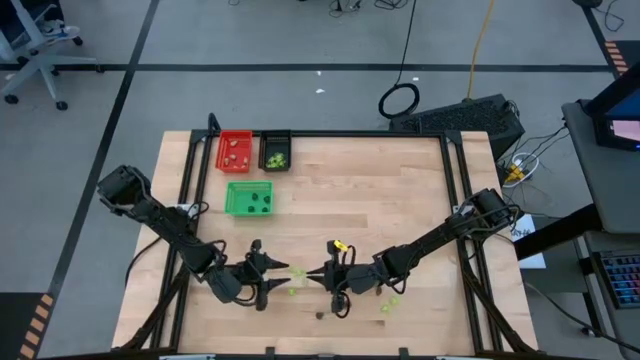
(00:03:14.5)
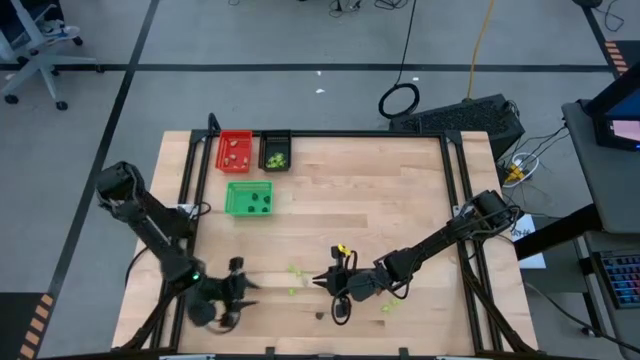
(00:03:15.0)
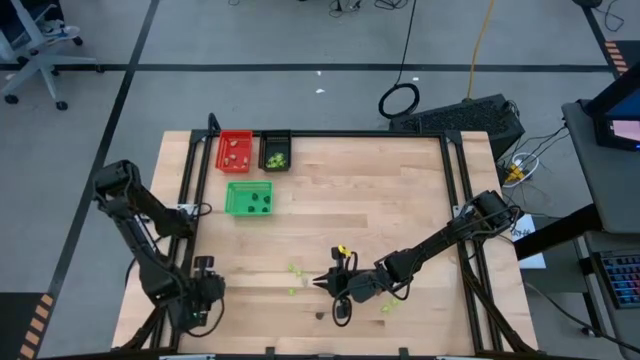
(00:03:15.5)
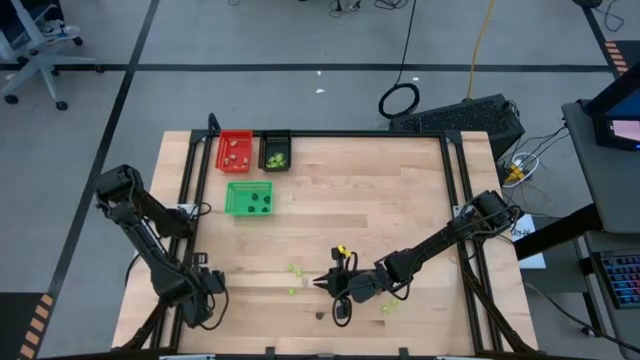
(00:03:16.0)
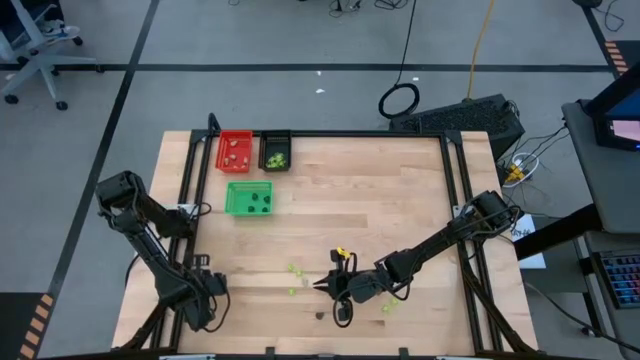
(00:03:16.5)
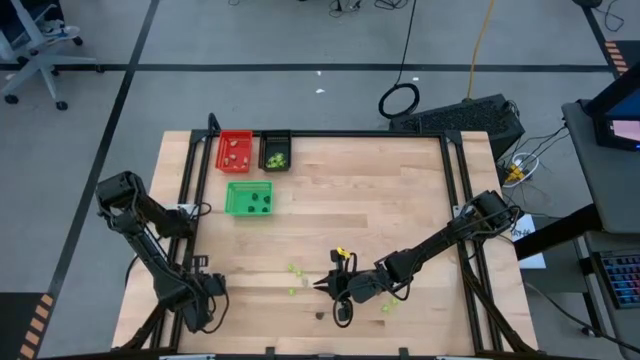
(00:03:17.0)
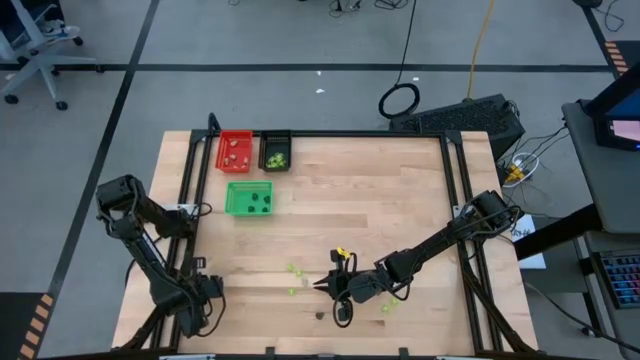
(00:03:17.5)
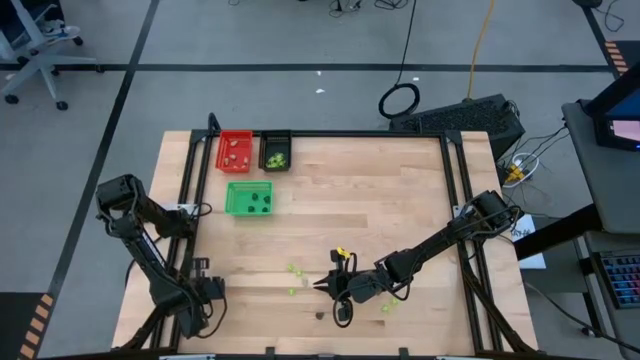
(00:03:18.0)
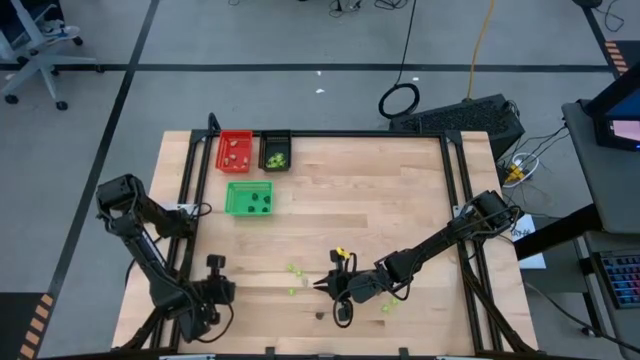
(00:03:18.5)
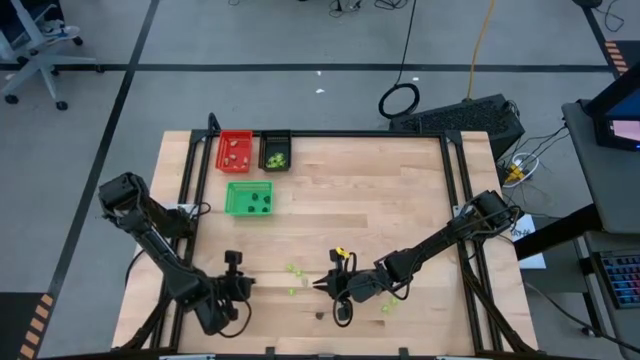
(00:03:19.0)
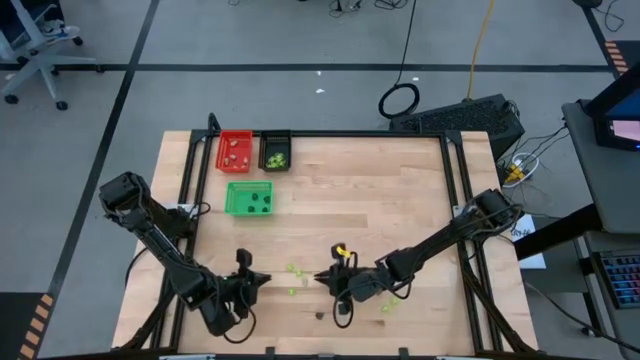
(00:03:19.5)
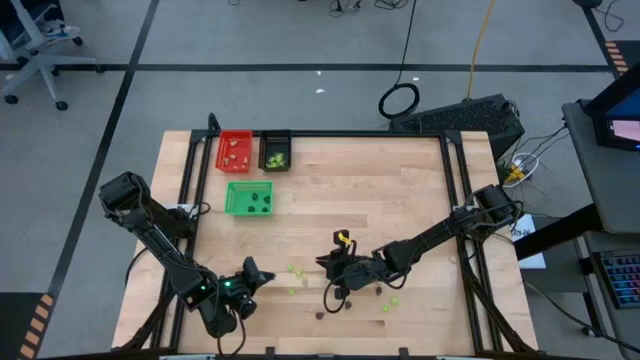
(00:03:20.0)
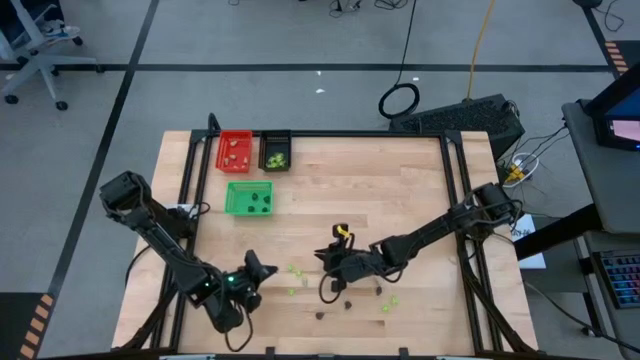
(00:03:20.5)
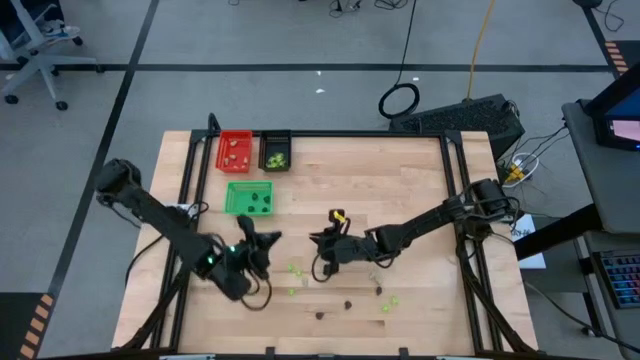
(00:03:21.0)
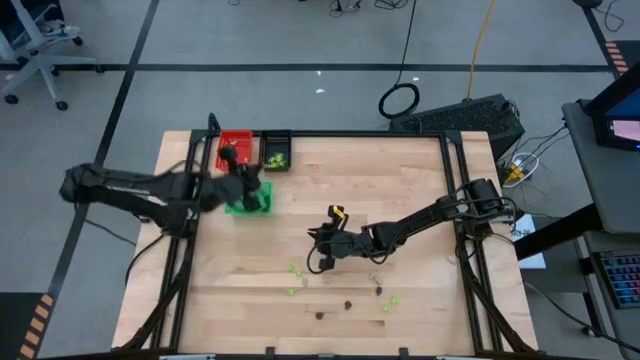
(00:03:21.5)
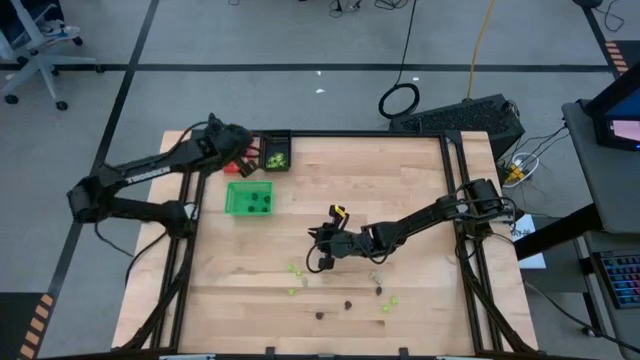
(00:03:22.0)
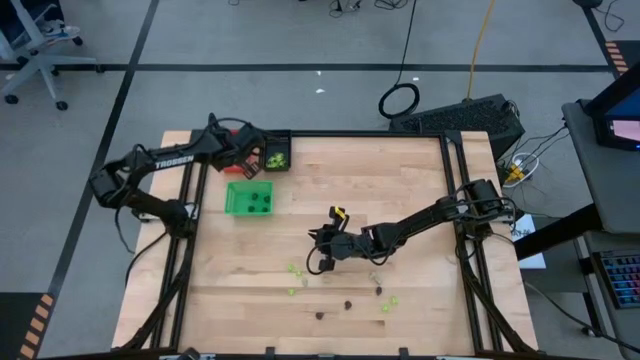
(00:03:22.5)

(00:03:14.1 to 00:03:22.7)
Task: Sort Halloween decoration
Put the white skull toy into the red bin

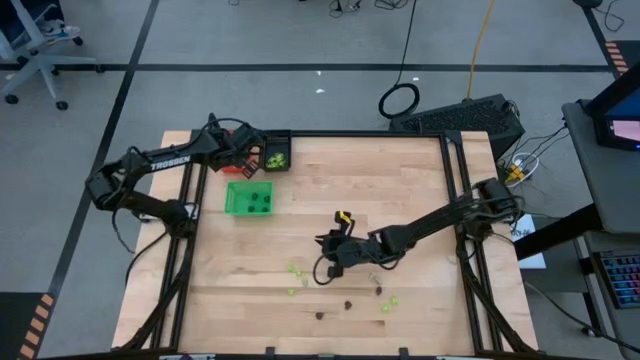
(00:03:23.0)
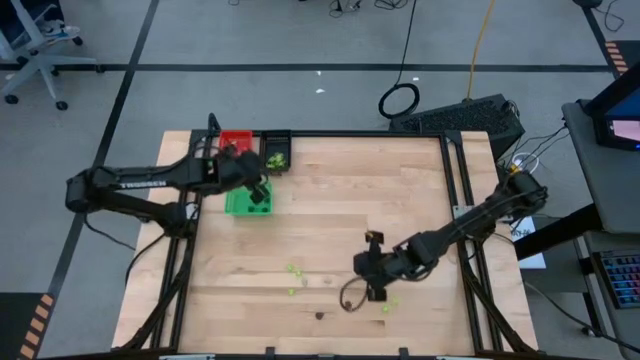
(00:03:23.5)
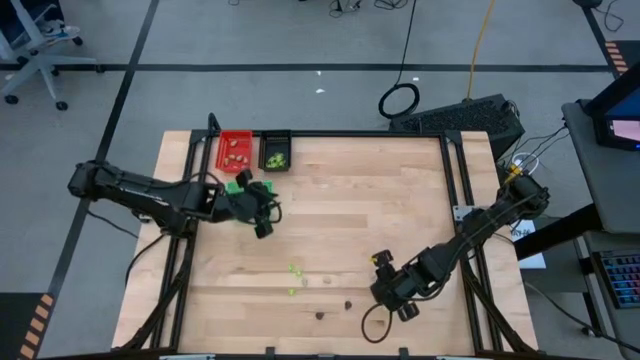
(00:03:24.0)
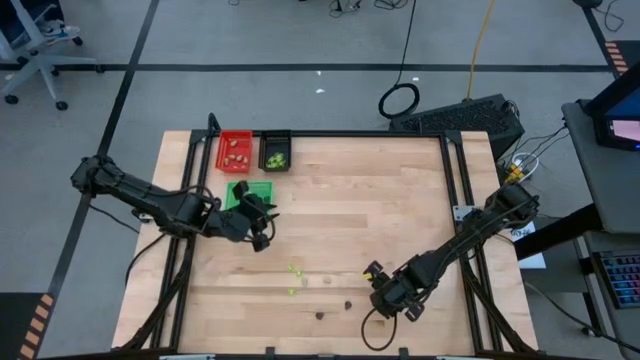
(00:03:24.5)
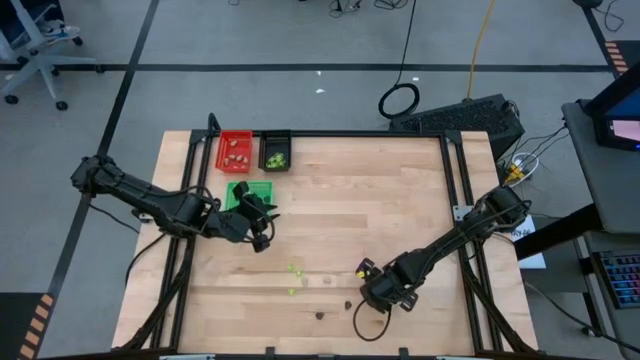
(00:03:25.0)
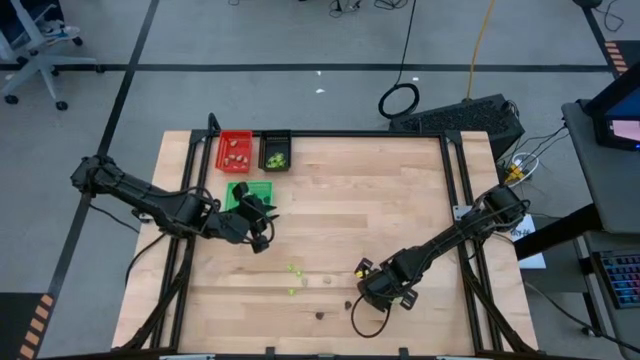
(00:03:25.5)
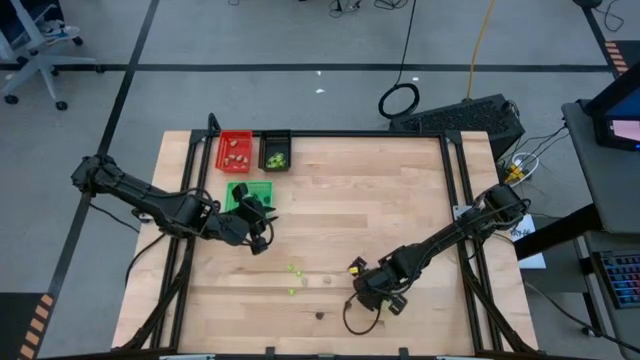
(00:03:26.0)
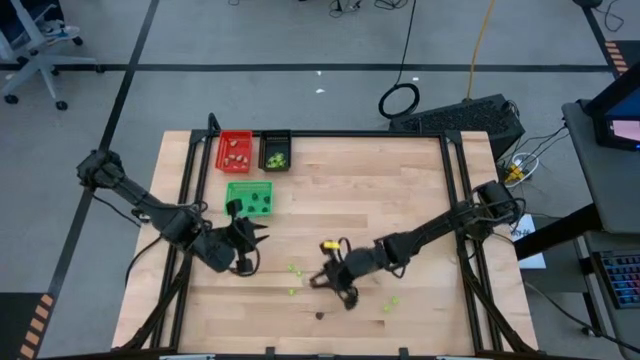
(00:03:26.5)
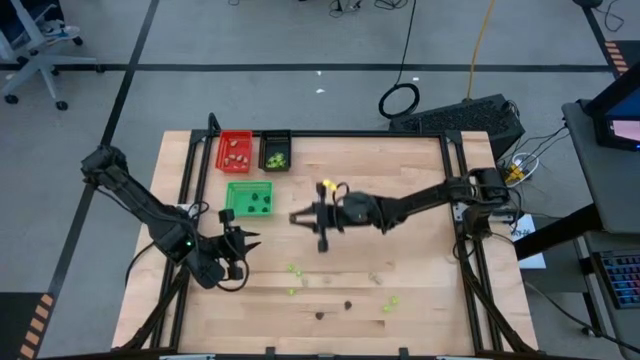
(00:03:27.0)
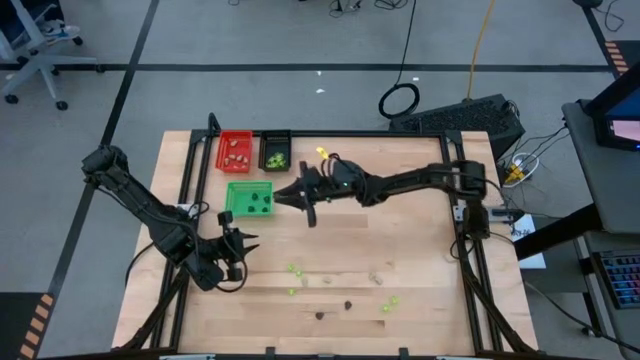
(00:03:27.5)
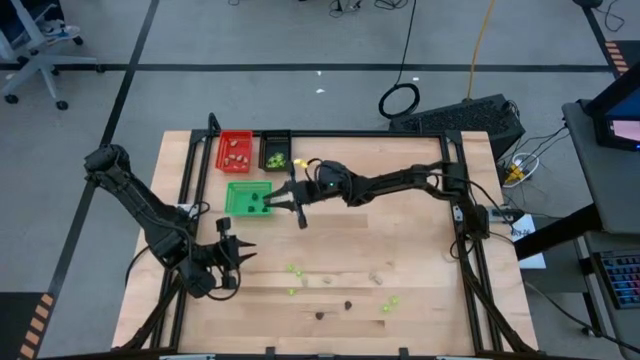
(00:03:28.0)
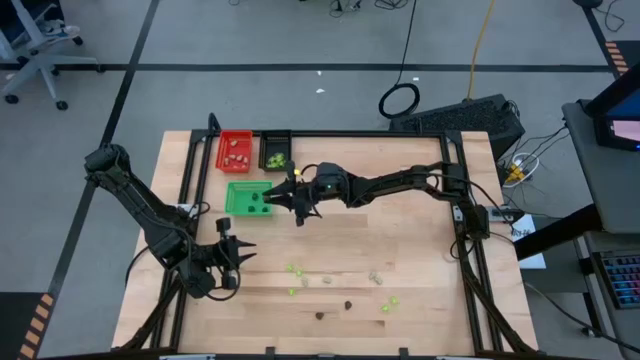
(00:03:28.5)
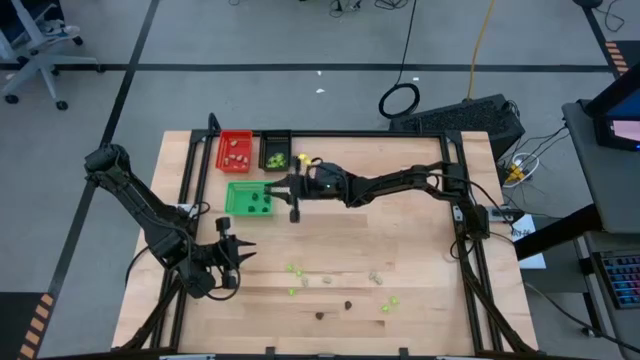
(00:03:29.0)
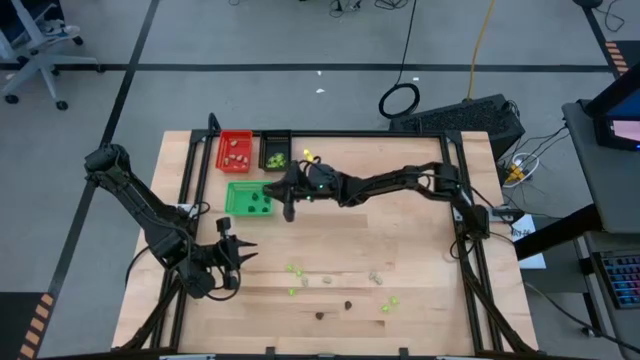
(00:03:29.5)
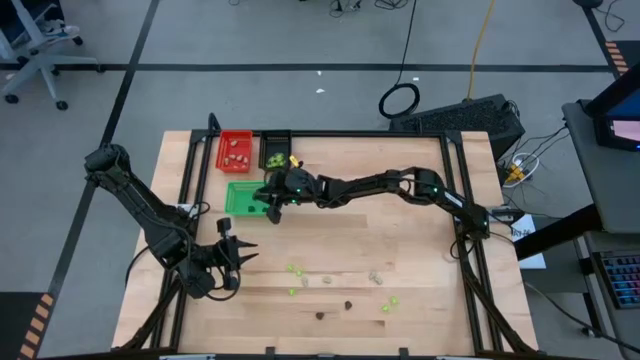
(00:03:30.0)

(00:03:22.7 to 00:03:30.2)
Put the black skull toy into the green bin

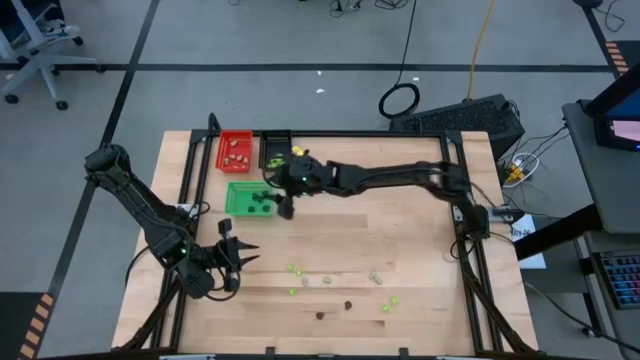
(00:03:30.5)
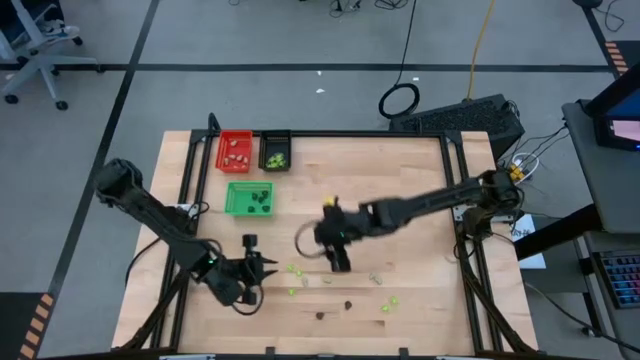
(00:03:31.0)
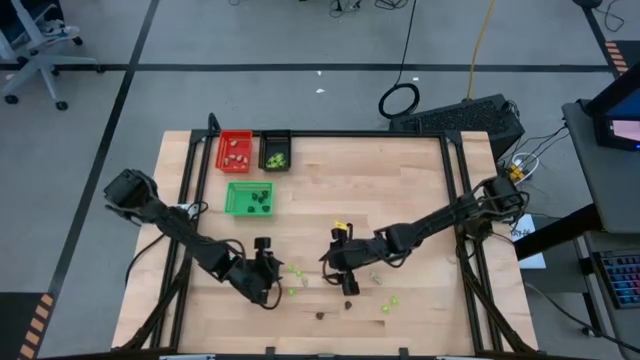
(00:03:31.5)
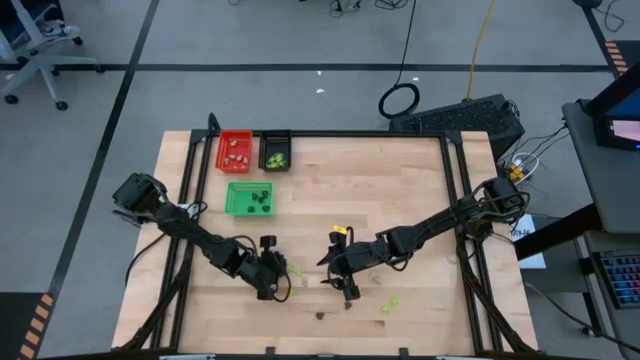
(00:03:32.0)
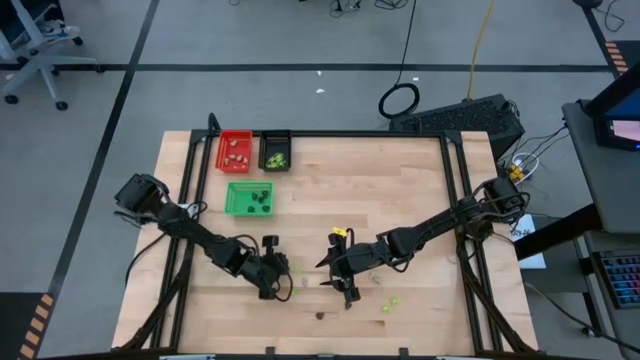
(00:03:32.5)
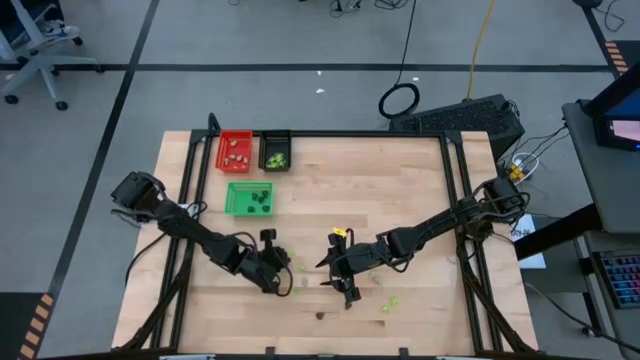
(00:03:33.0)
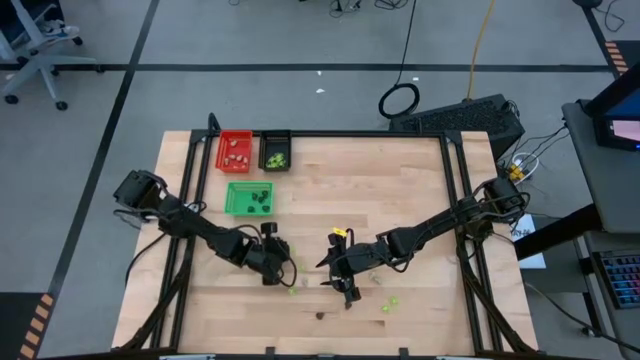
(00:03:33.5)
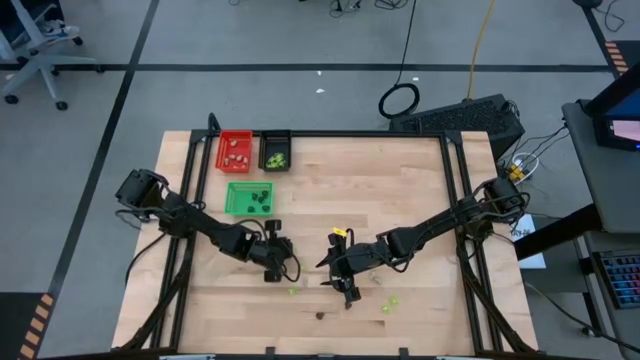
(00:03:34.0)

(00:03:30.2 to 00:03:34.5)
Put the green spider toy into the black bin
